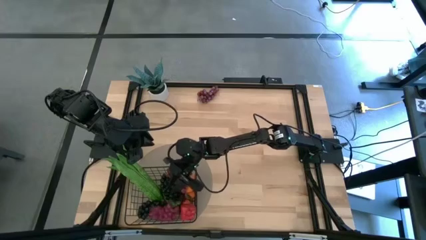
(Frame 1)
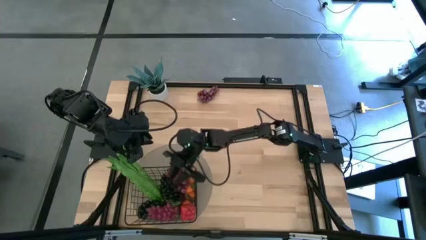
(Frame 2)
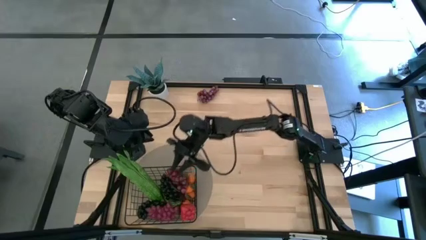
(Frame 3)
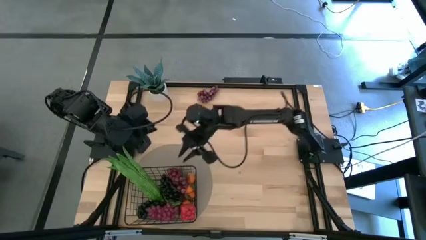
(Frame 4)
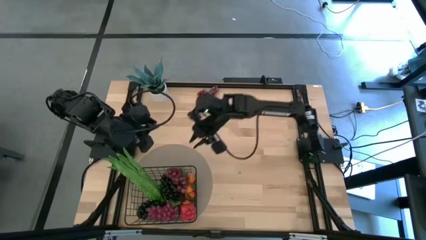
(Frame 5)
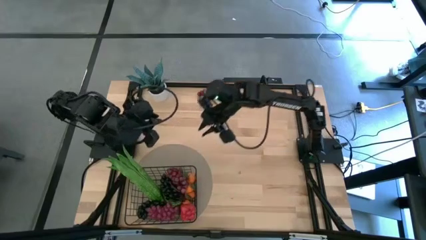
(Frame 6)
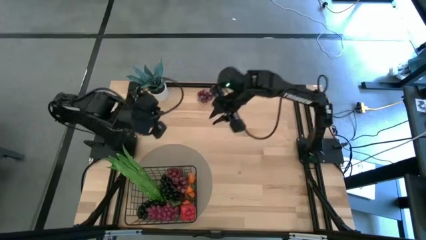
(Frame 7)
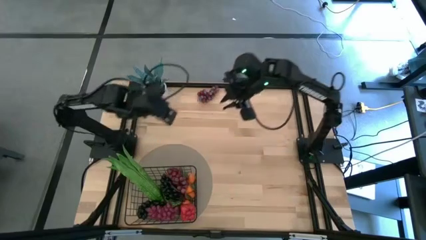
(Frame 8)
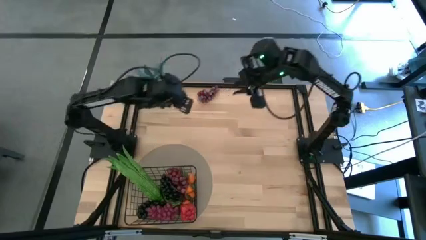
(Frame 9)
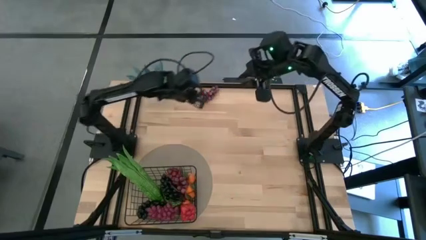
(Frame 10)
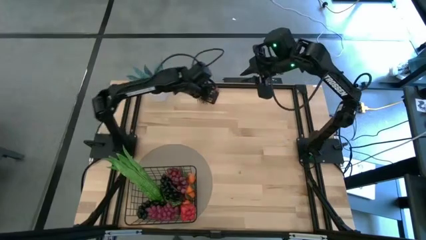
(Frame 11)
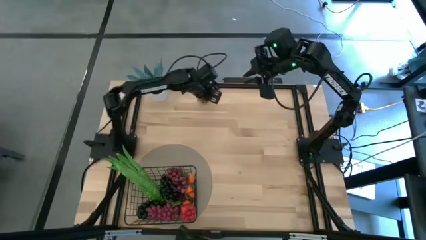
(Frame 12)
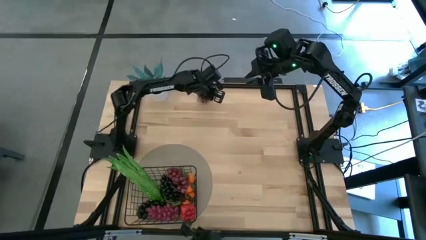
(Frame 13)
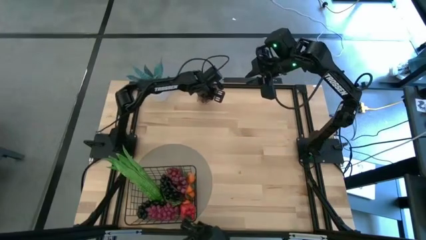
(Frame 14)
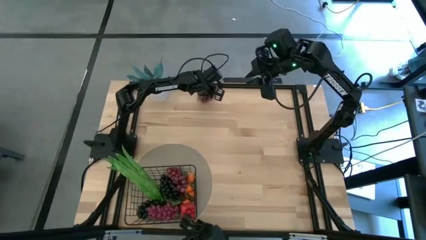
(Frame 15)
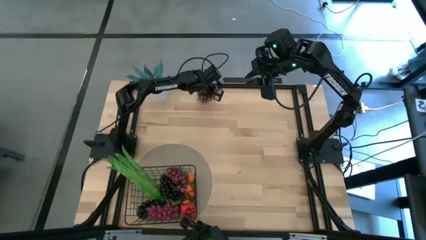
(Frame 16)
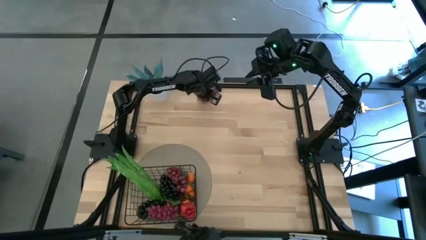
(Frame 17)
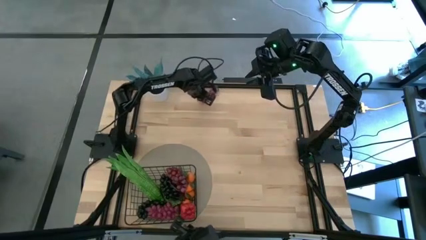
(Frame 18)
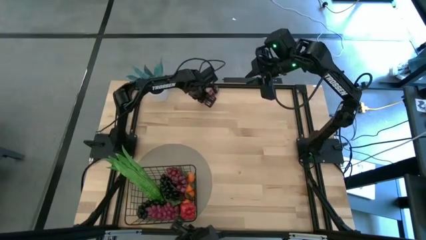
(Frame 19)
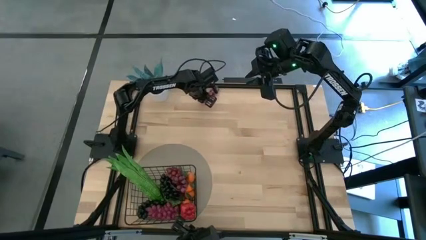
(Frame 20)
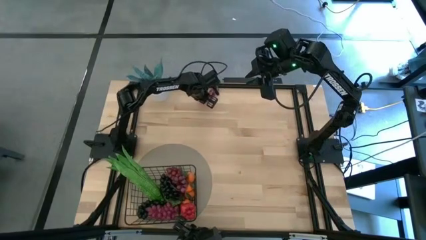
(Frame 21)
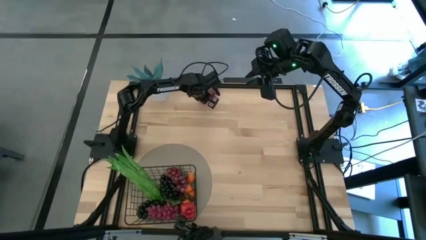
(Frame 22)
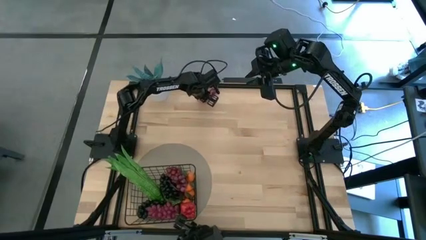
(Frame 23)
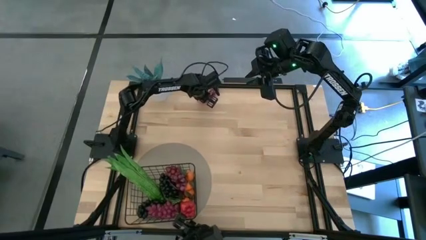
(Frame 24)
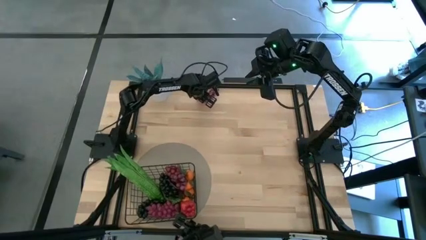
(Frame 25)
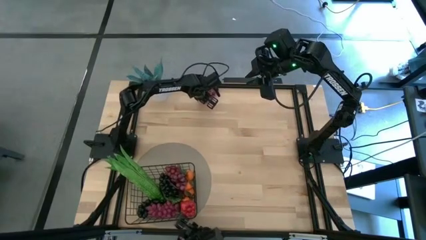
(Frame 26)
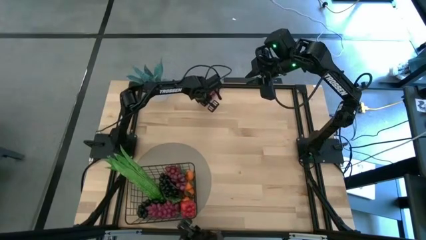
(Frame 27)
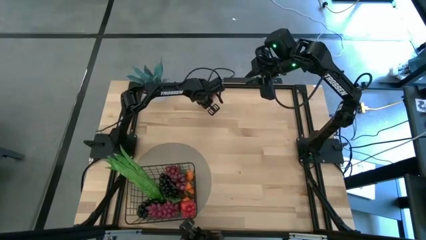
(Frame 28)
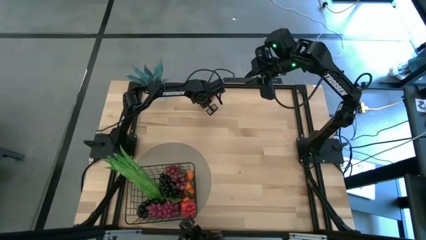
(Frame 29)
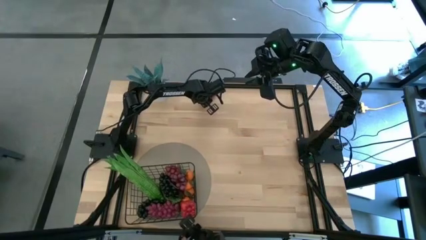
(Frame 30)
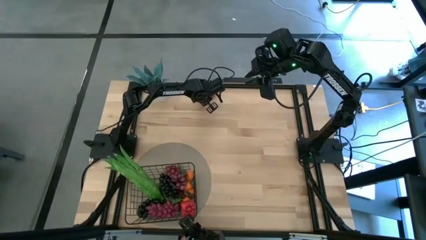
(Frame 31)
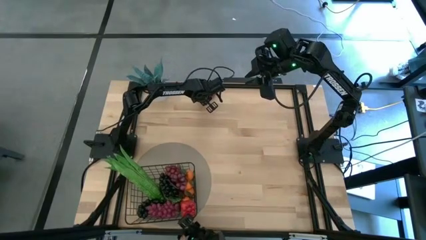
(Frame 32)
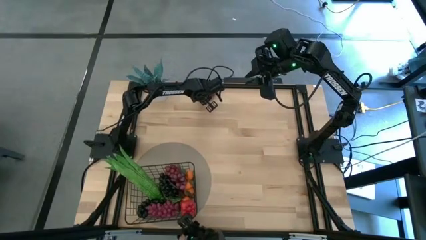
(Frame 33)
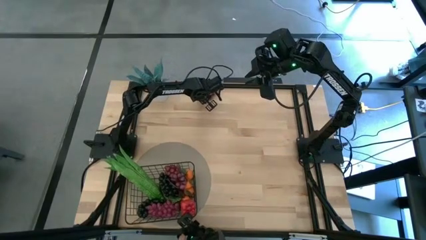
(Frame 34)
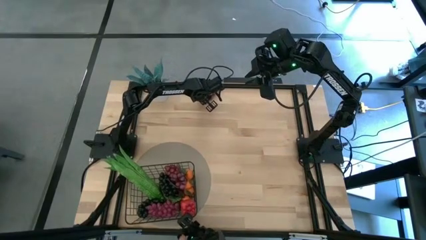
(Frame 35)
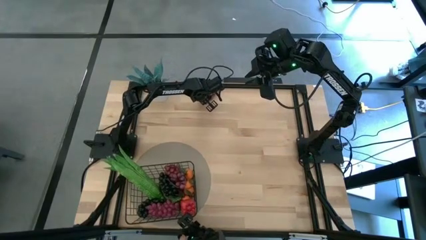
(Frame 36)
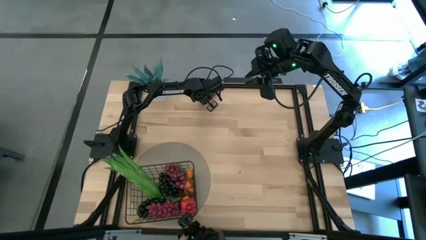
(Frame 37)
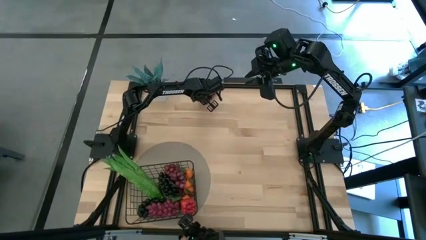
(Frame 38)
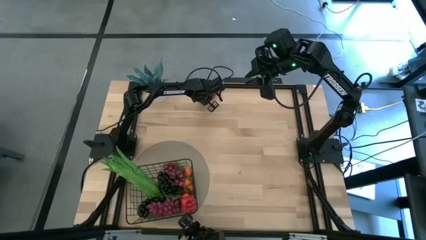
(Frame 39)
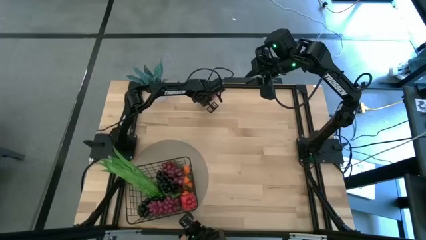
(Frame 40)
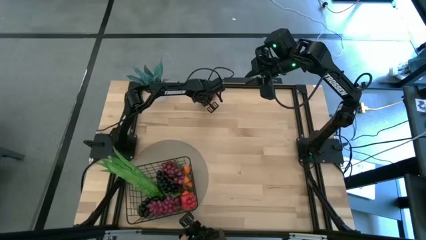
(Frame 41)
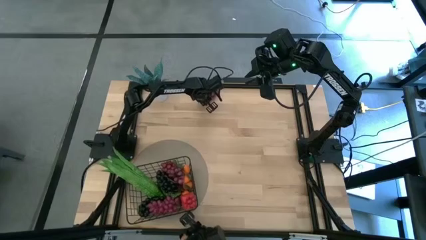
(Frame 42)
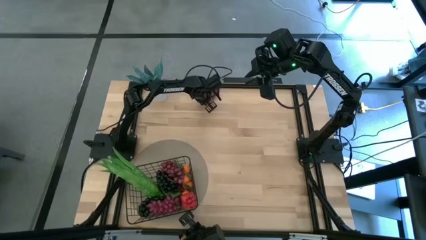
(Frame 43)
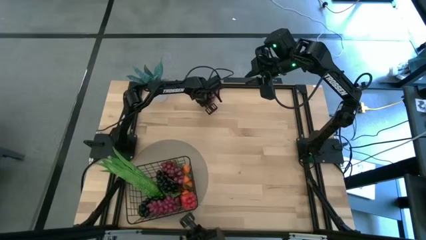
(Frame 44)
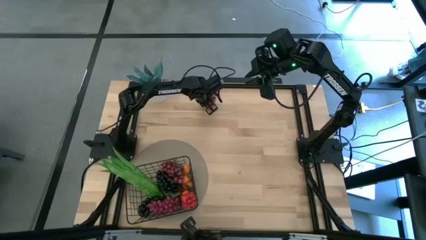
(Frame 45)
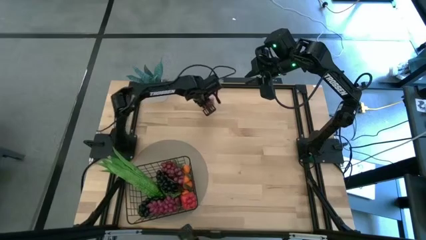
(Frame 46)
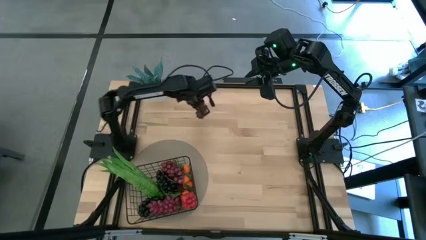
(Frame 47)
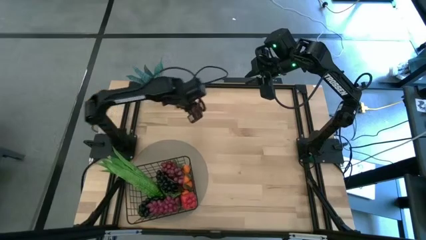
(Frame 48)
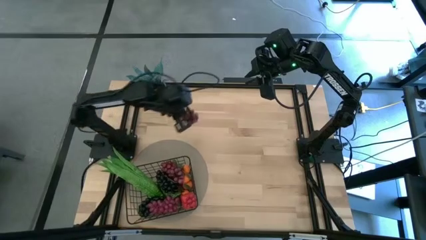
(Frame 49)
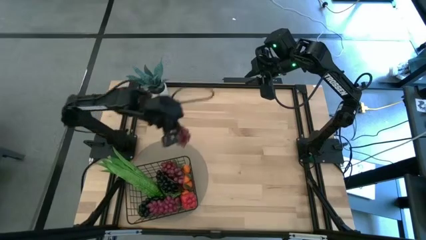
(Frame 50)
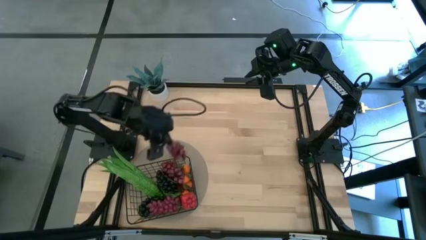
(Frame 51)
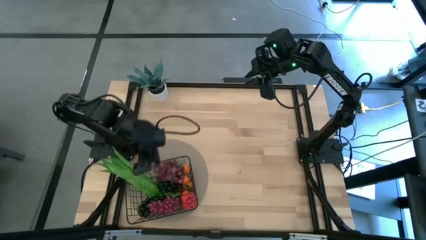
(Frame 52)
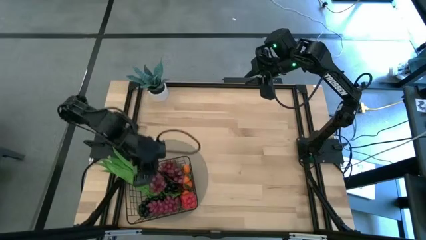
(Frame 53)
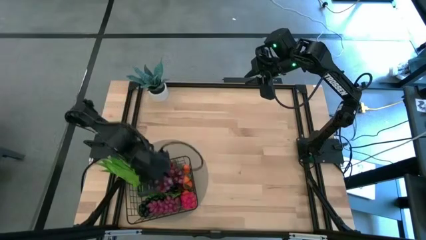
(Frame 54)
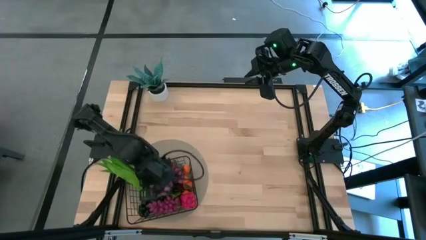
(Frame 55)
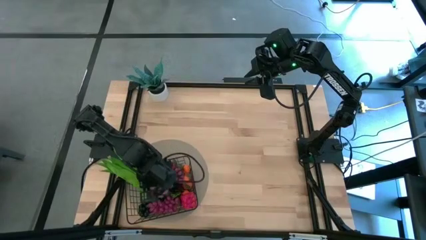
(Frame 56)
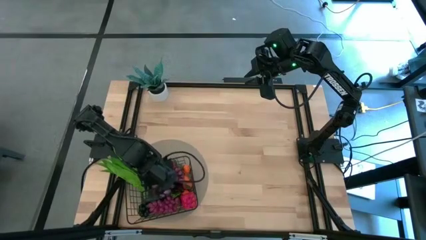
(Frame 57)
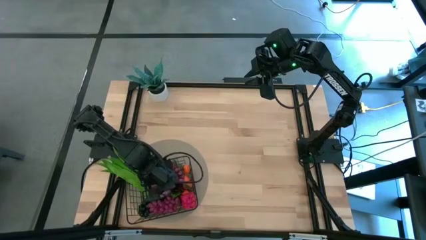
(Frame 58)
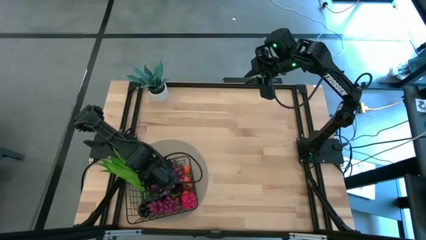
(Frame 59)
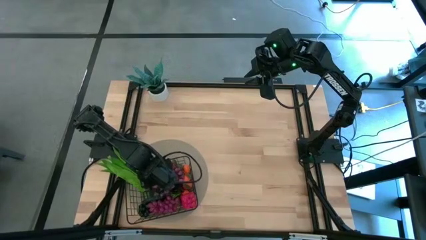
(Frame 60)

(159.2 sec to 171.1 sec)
Task: Build produce basket
Put the red grapes into the wire basket

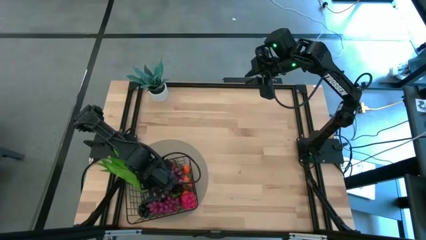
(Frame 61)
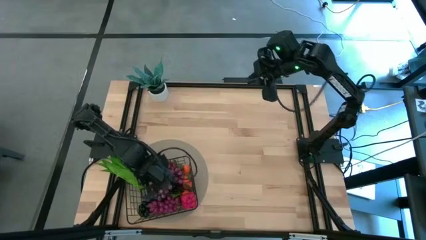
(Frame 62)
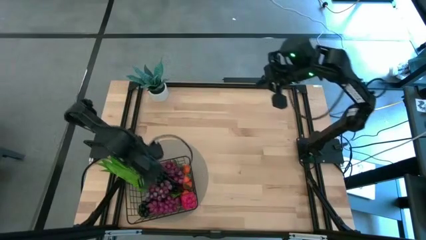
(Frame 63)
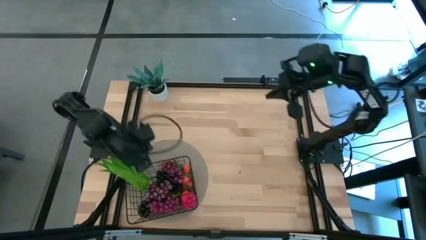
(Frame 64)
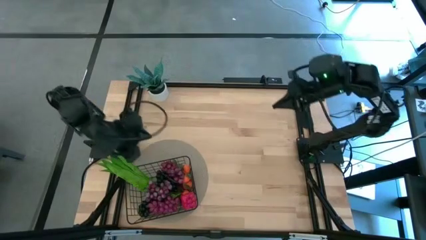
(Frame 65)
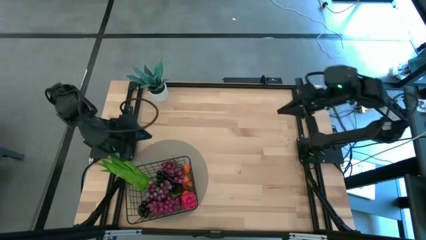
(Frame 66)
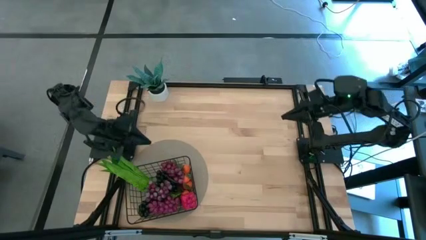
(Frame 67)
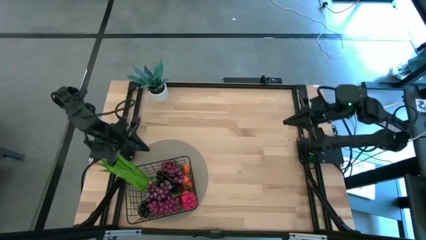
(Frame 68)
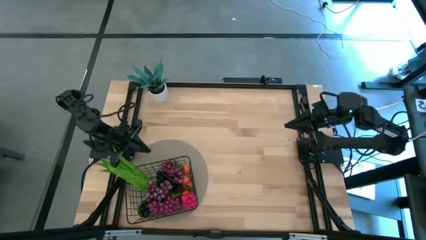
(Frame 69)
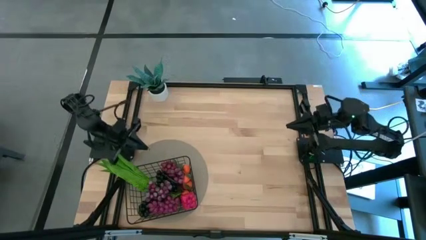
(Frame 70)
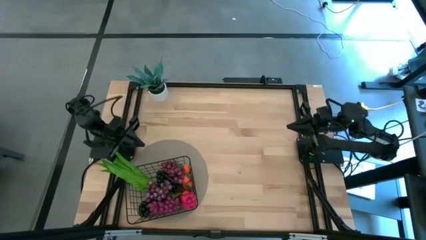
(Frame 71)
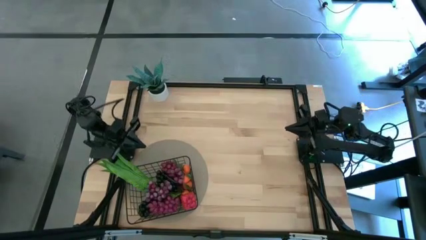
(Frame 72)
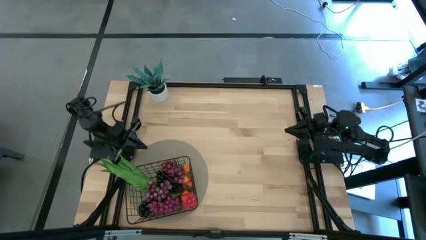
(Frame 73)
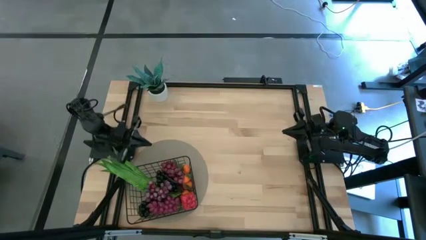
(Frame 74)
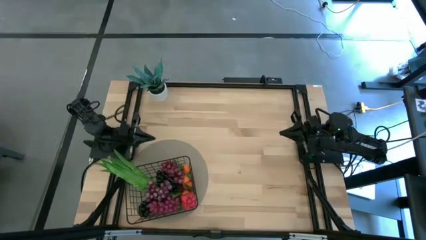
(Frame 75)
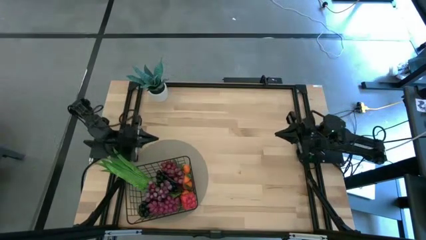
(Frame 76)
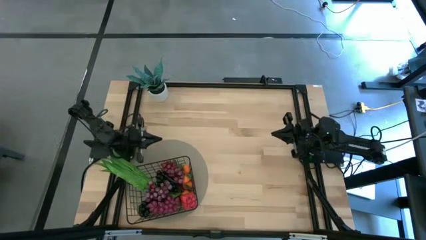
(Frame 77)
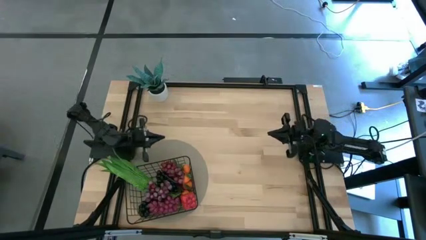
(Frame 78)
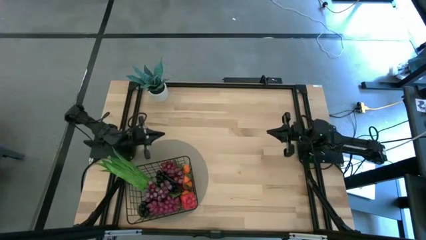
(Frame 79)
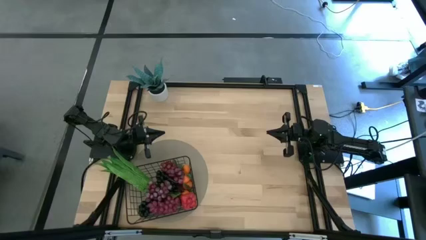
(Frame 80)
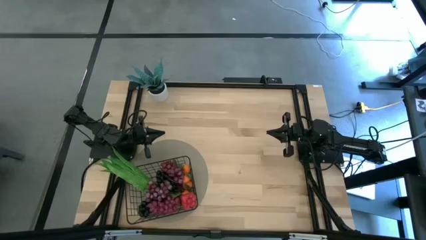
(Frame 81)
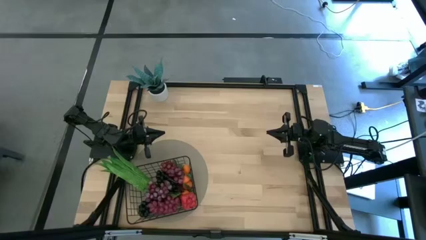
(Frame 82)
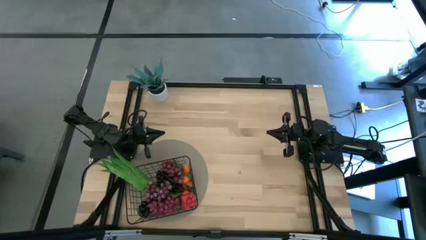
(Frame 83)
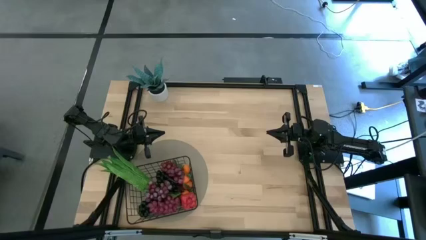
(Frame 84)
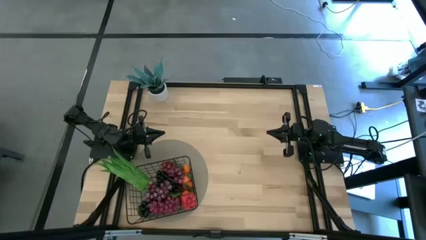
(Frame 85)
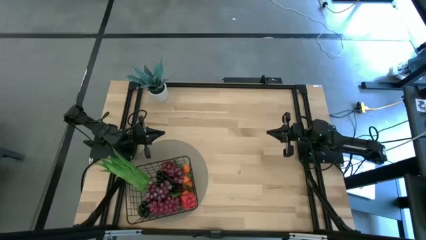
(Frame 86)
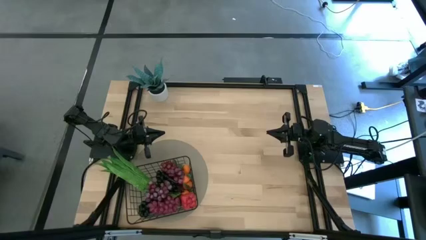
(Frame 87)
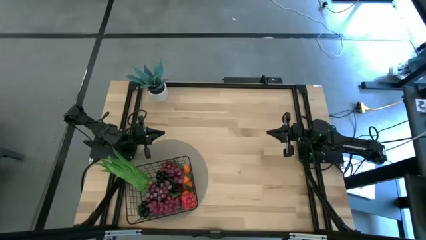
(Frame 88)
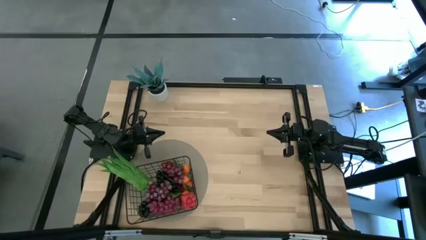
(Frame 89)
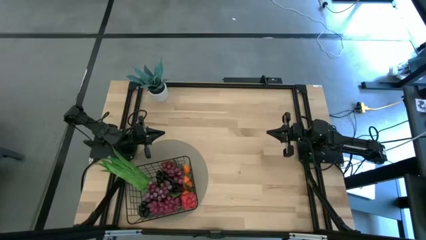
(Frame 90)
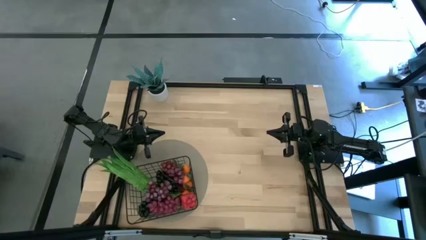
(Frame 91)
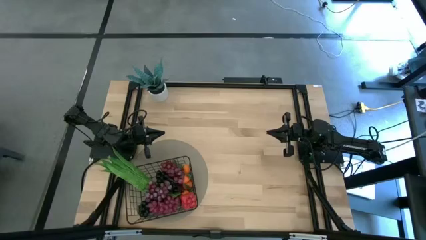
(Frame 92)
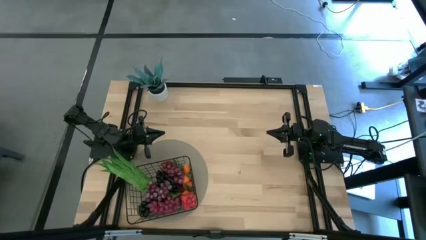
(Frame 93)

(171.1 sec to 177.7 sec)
Return to Home Position
